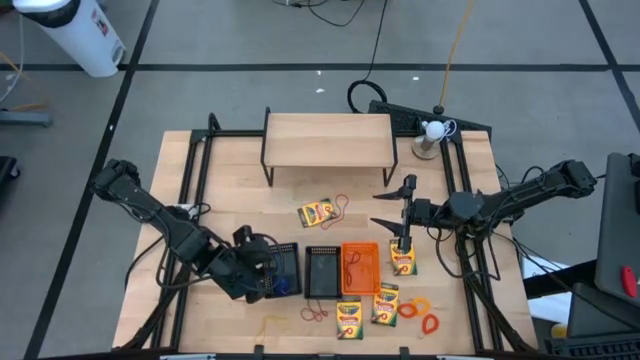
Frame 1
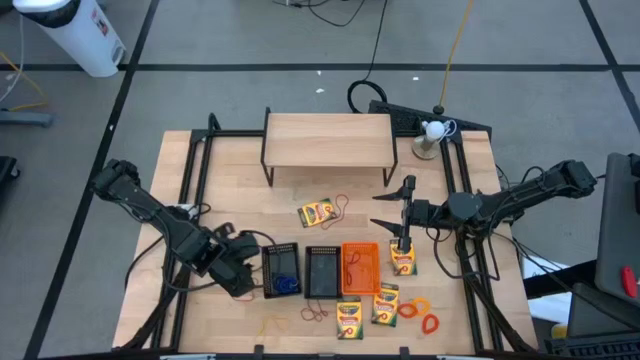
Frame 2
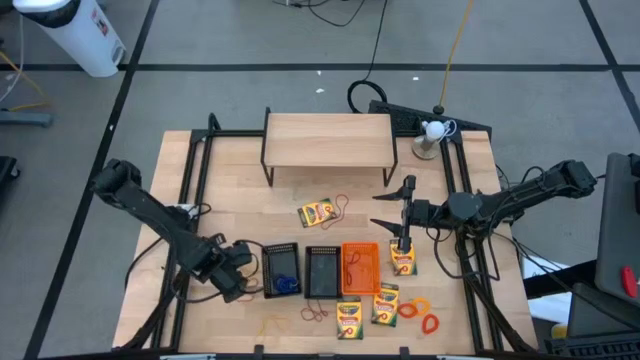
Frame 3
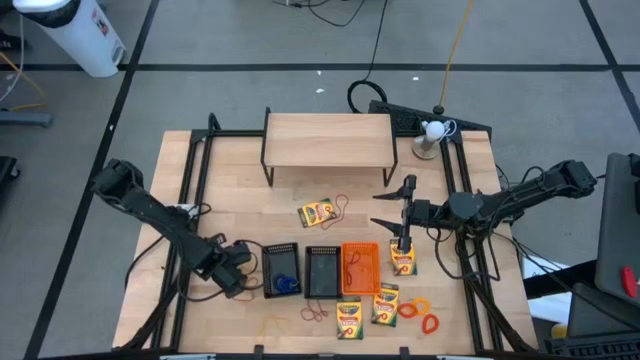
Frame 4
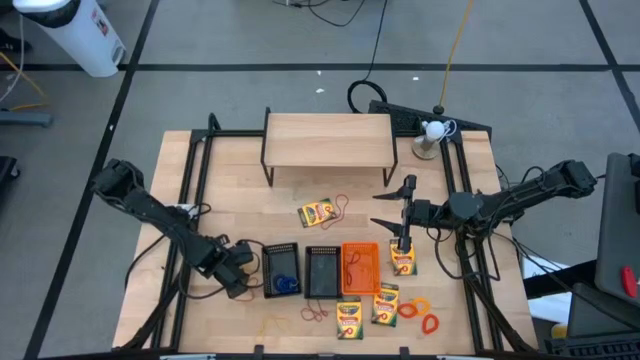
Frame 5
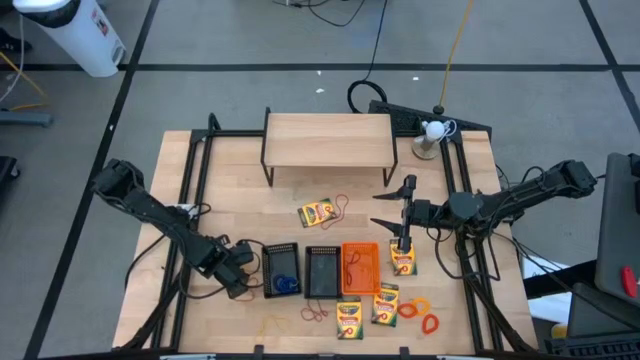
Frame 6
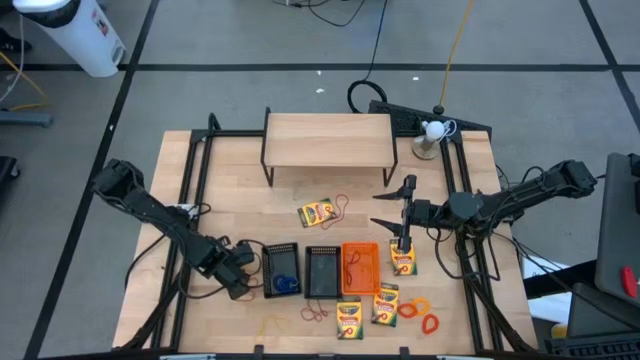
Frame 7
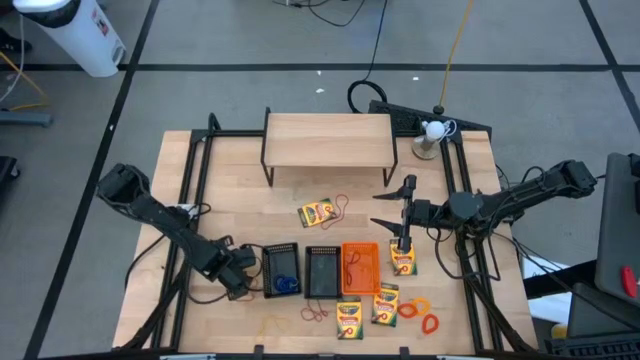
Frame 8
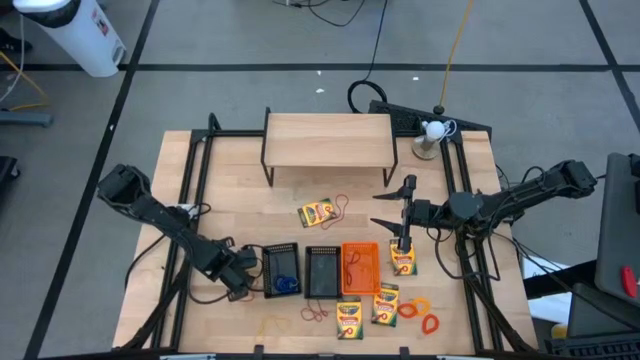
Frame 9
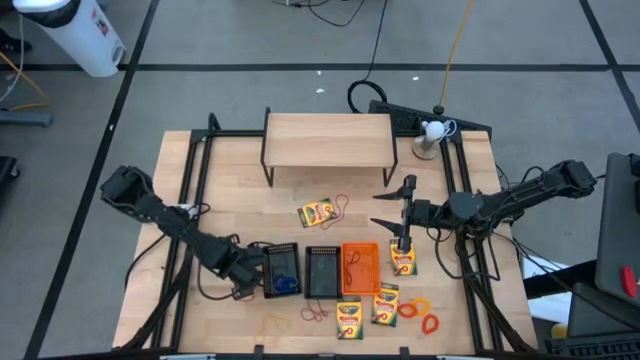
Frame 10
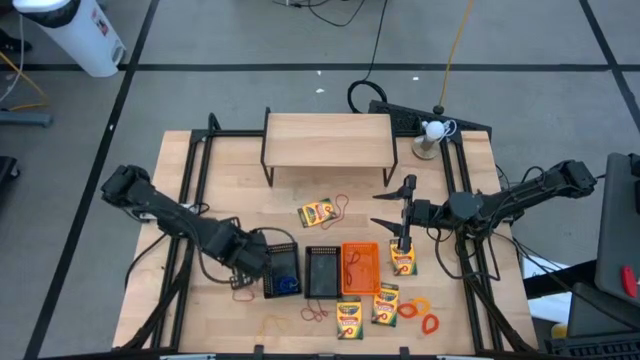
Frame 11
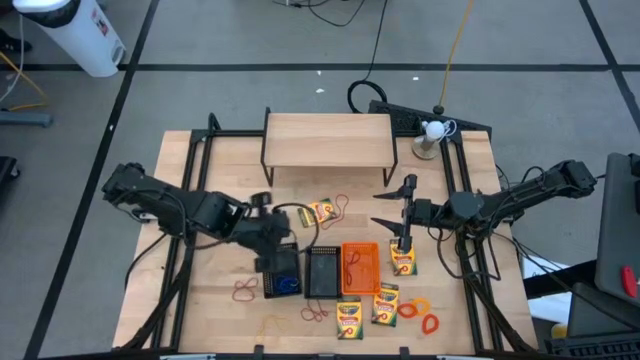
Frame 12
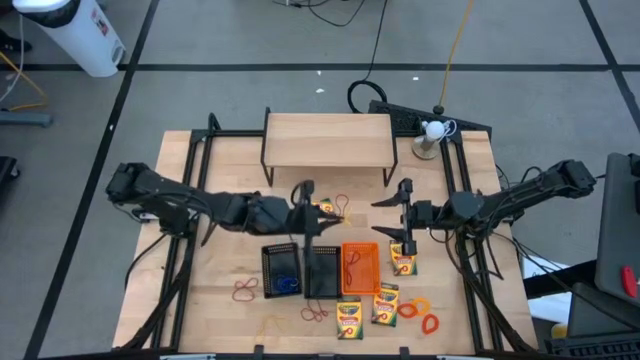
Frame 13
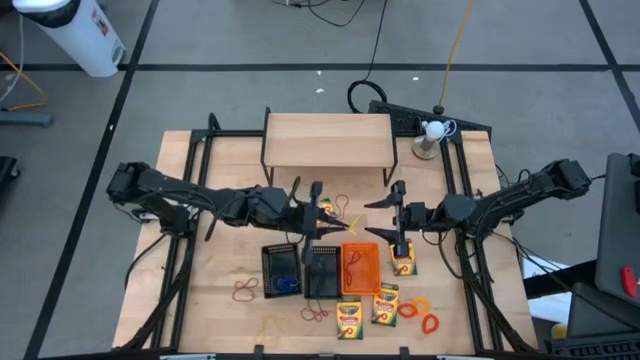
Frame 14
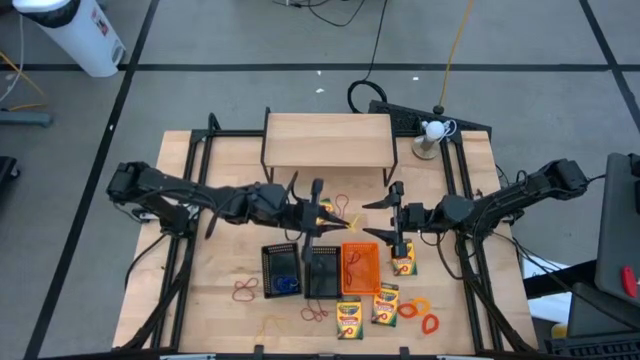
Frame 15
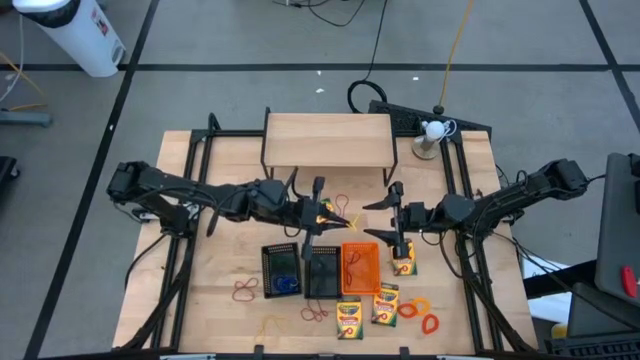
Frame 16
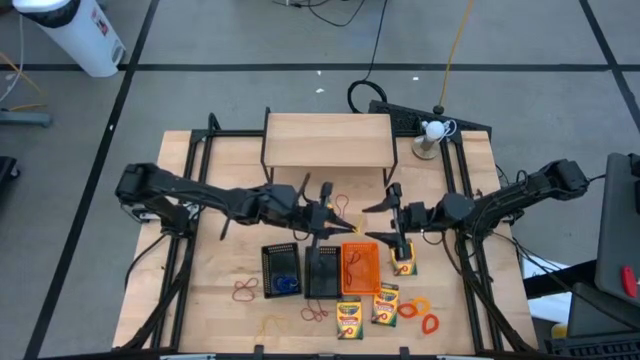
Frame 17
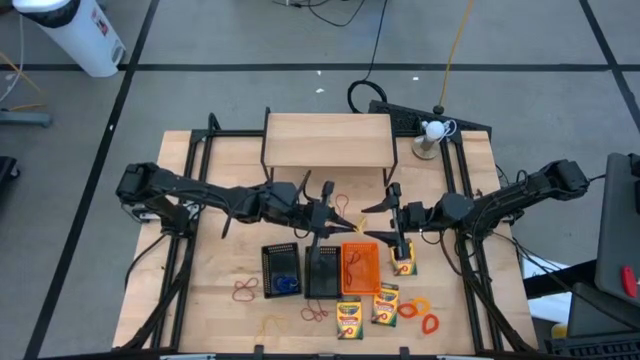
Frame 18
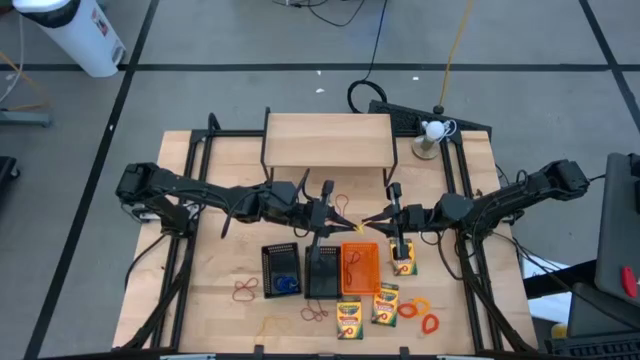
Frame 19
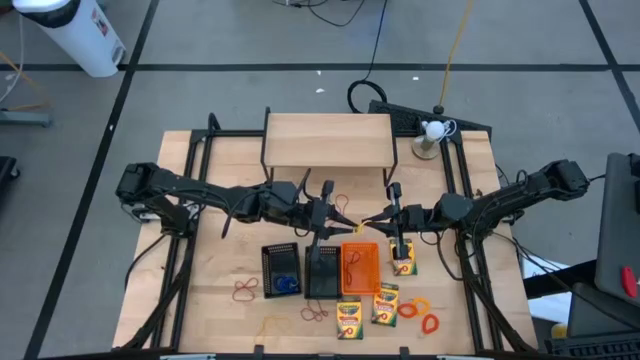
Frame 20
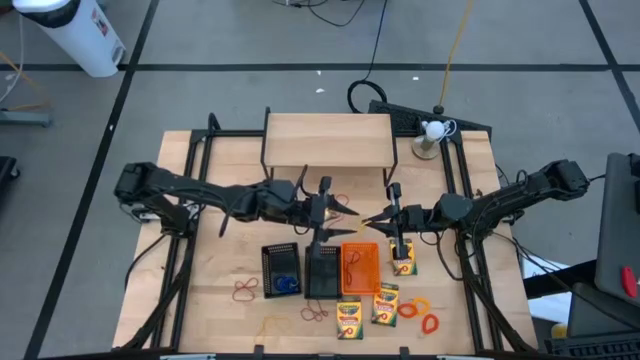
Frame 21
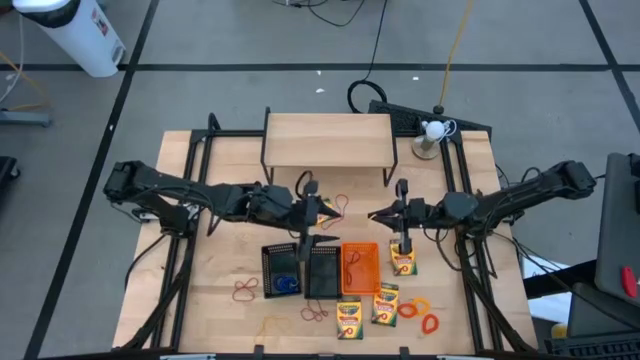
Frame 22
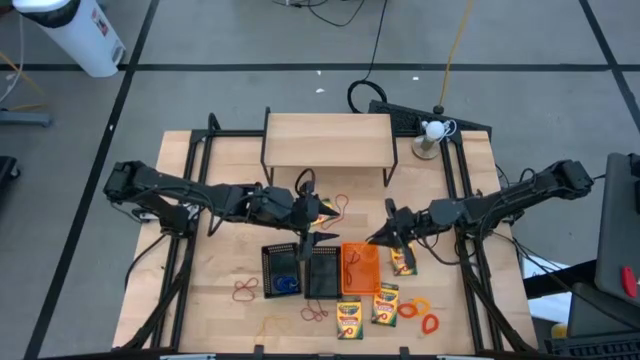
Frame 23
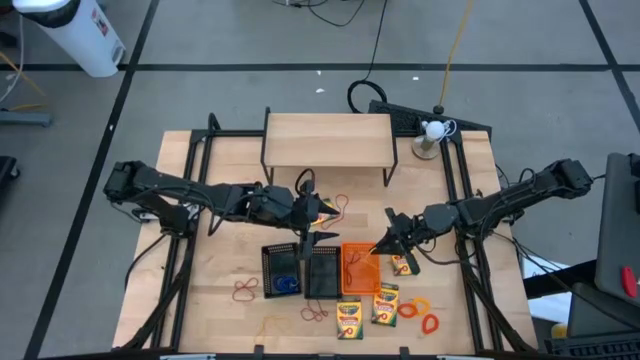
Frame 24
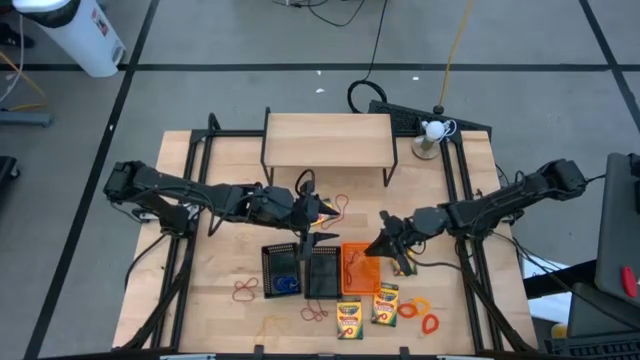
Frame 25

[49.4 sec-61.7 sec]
Task: Pick & Place Office Desk Supplies
Put the yellow rubber band into the orange bin

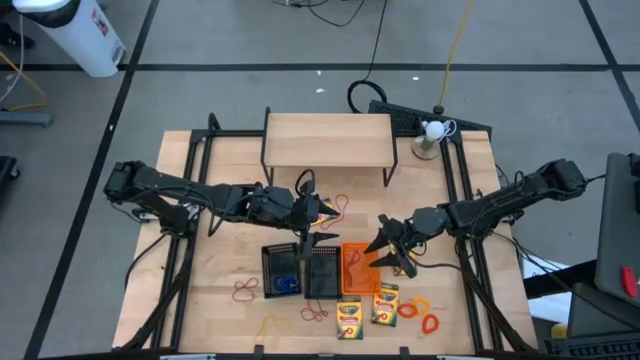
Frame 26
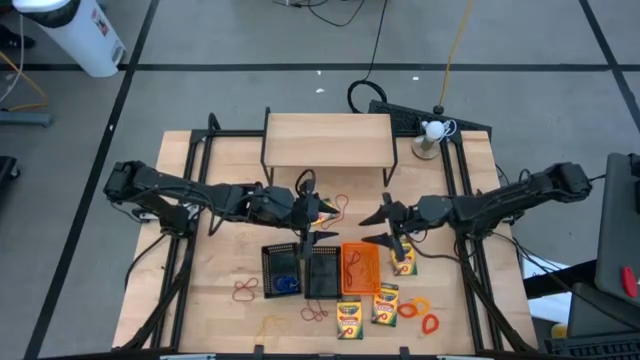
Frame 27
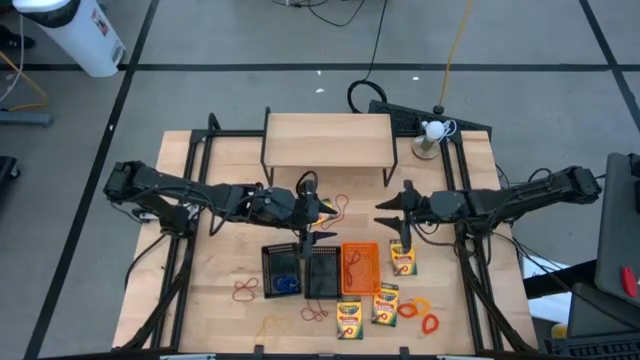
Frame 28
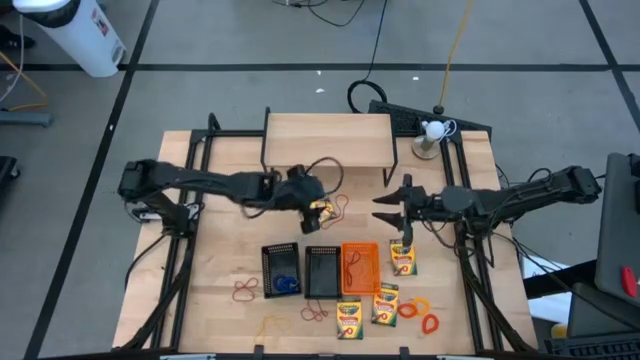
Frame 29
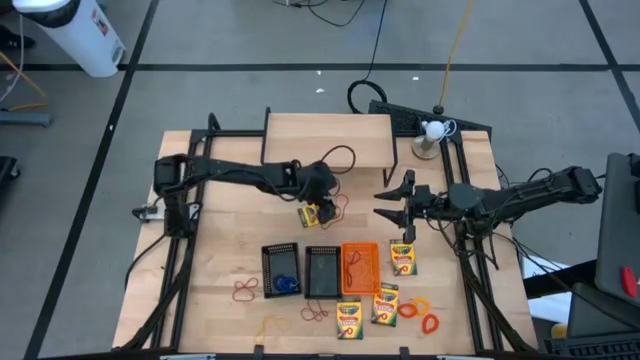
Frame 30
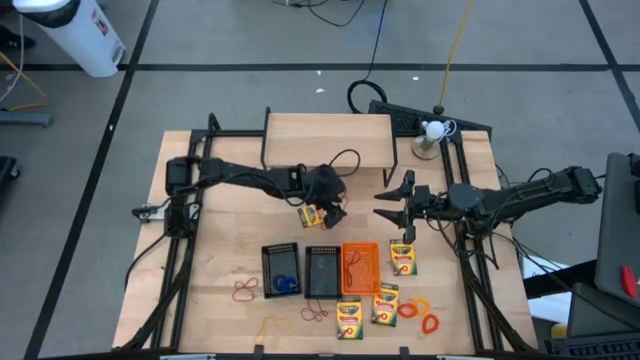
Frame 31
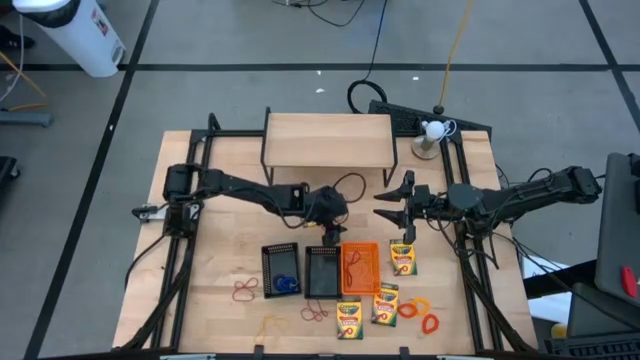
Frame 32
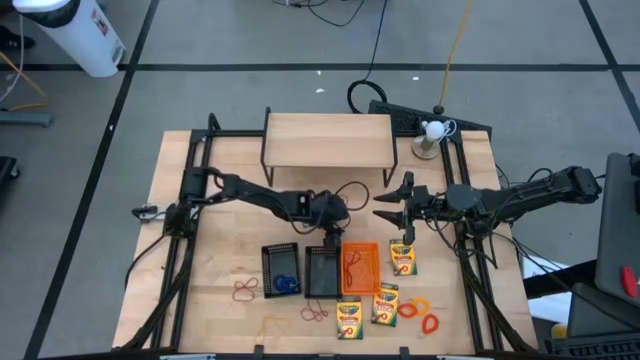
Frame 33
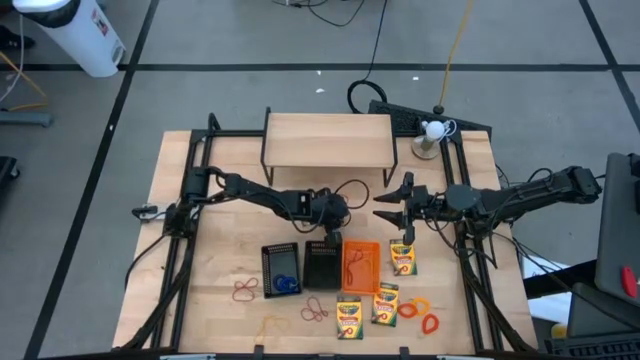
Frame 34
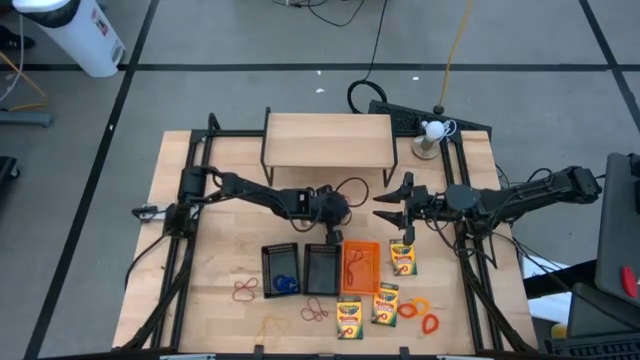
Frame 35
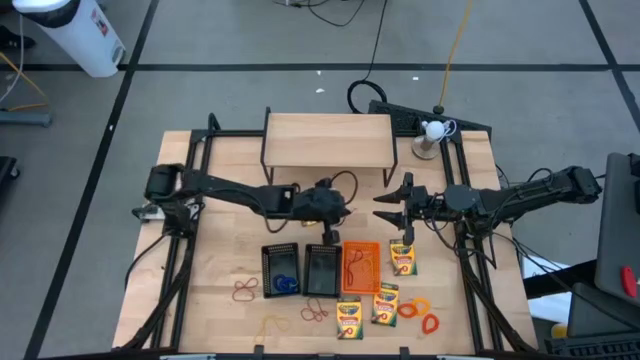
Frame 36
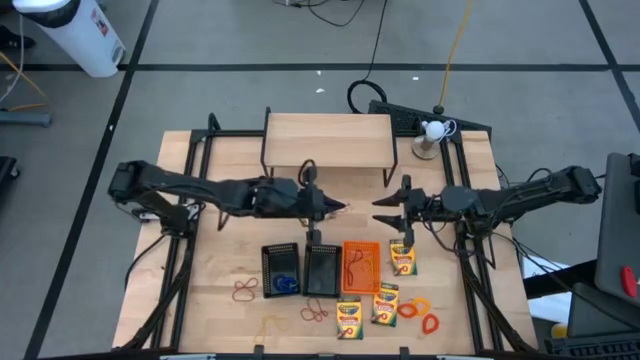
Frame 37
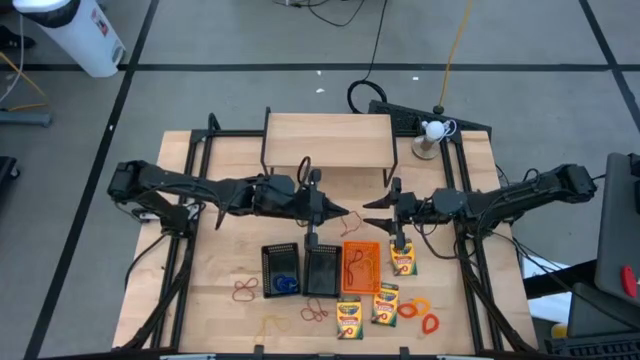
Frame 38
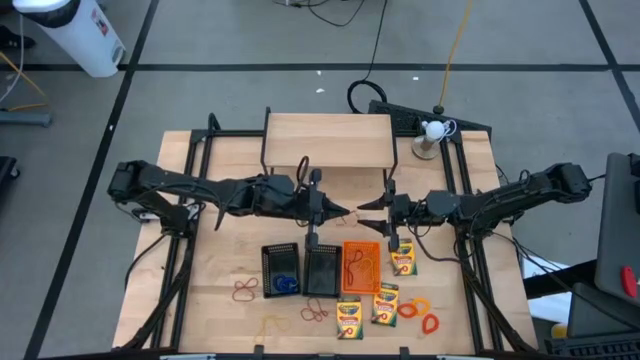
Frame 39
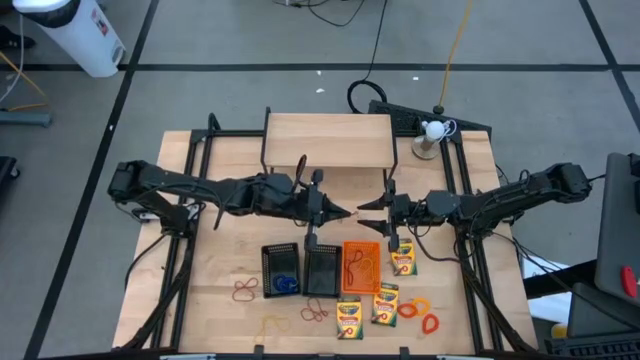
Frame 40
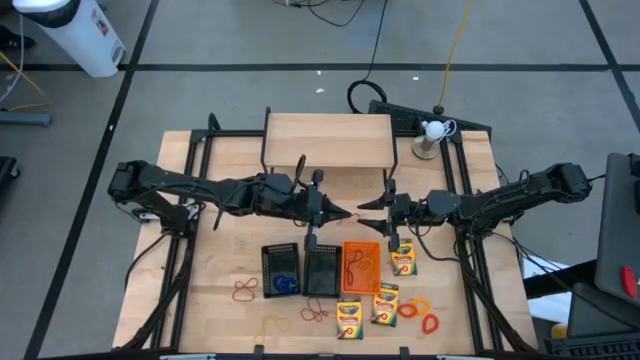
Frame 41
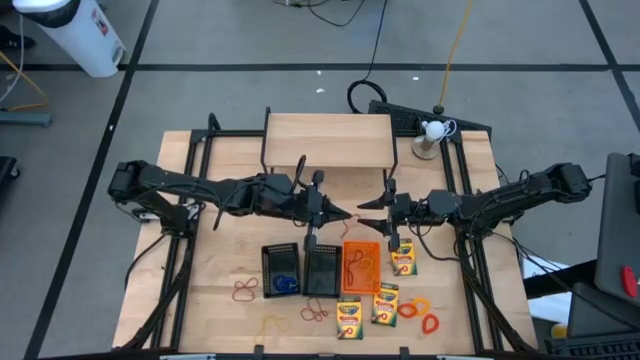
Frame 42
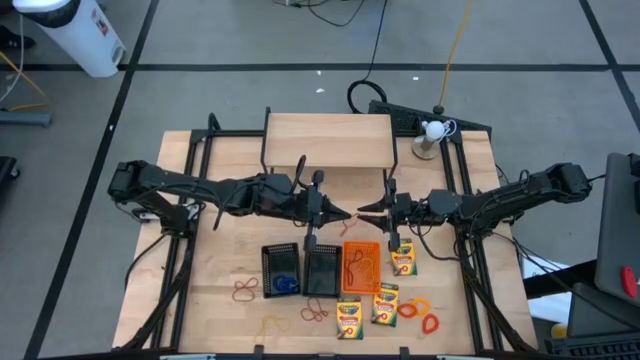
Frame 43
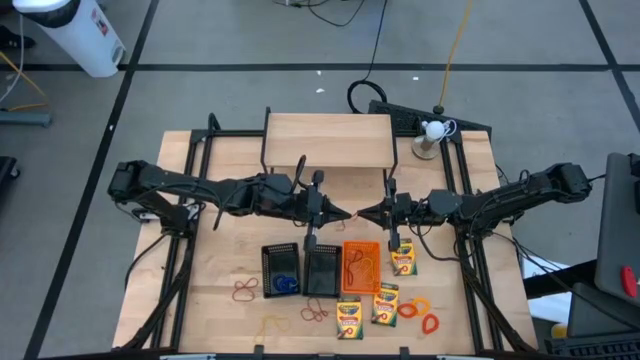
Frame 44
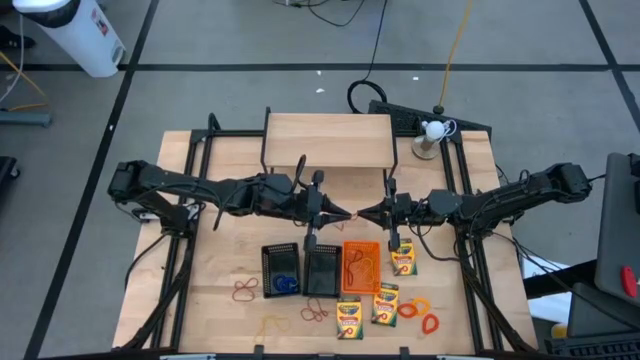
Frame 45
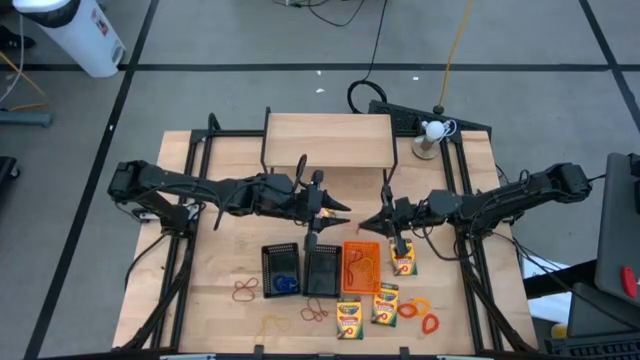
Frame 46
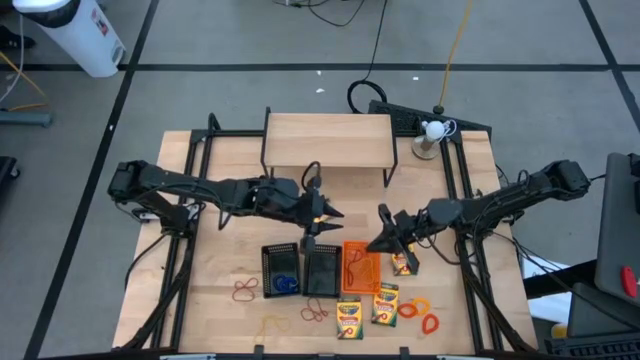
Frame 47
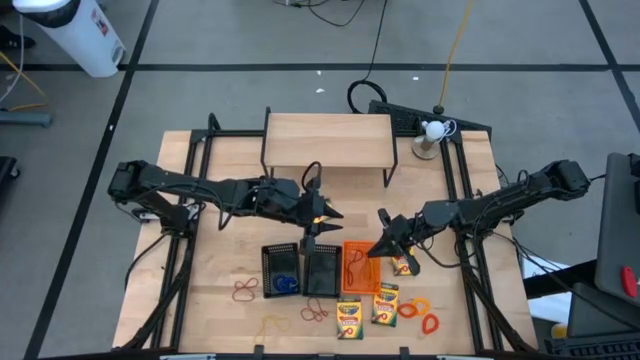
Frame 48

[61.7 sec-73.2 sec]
Put the red rubber band into the orange bin
